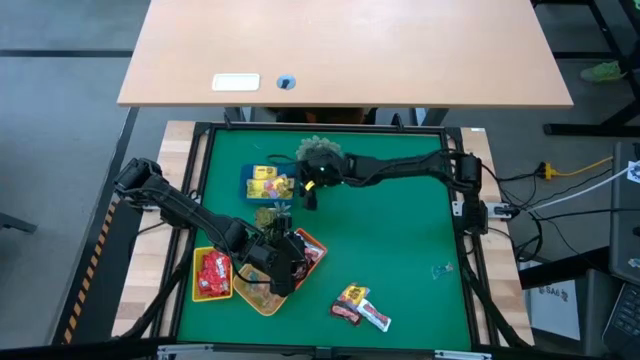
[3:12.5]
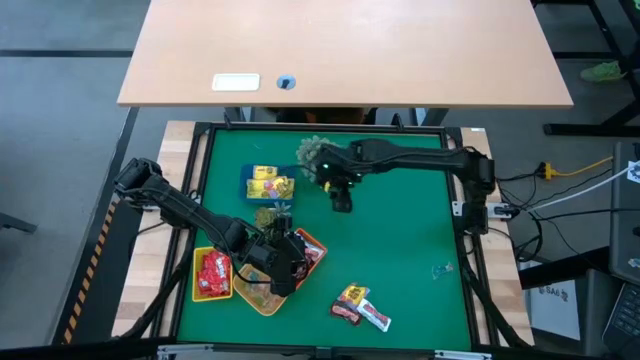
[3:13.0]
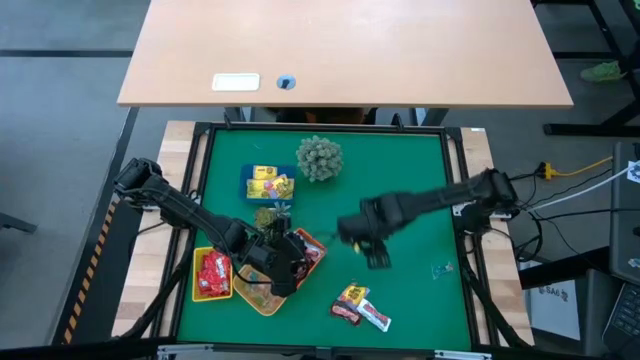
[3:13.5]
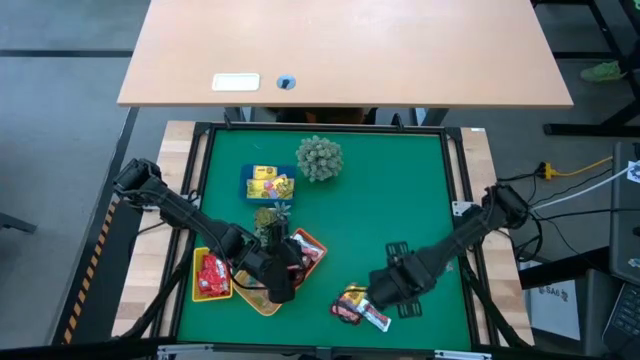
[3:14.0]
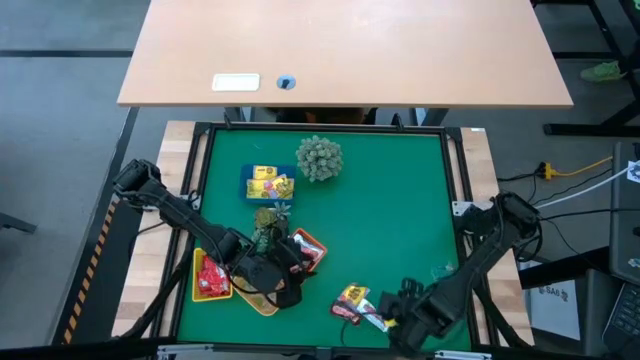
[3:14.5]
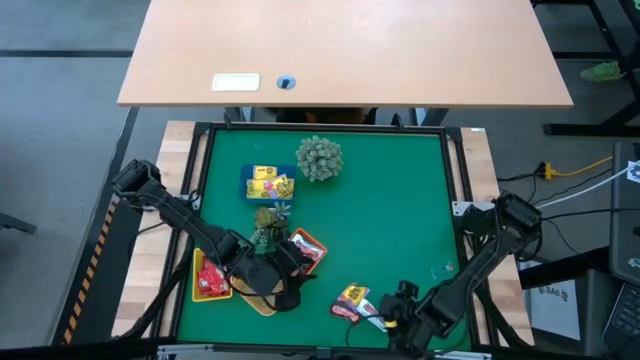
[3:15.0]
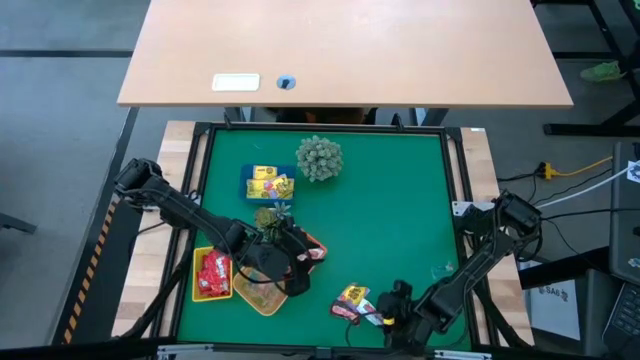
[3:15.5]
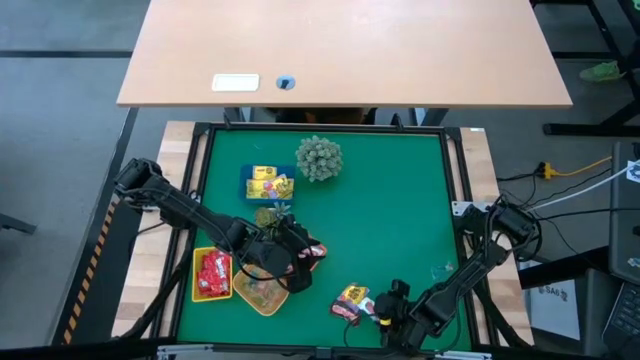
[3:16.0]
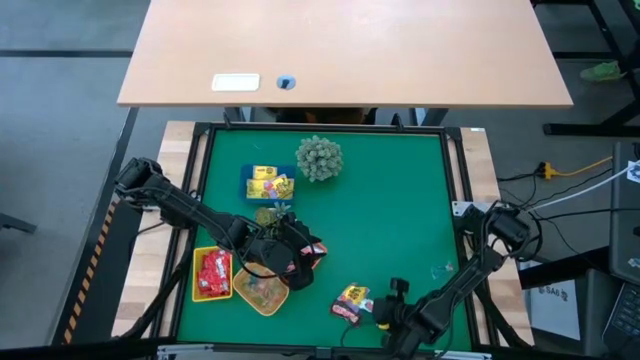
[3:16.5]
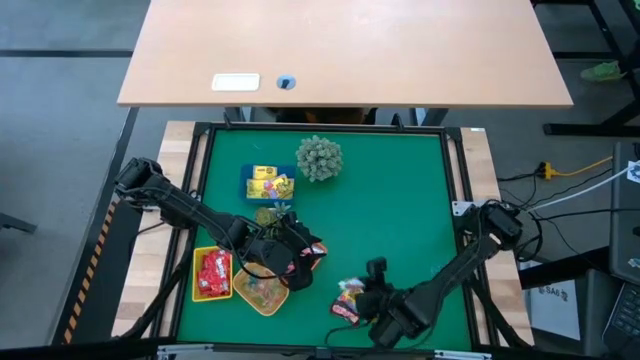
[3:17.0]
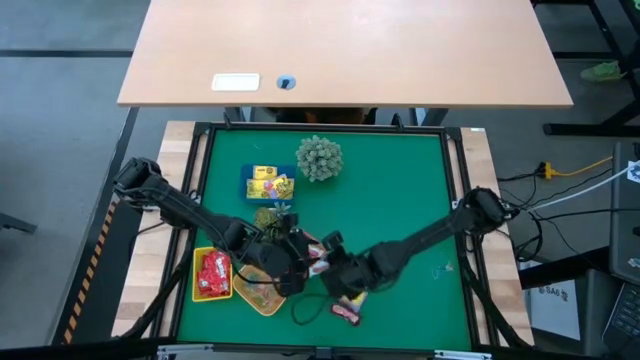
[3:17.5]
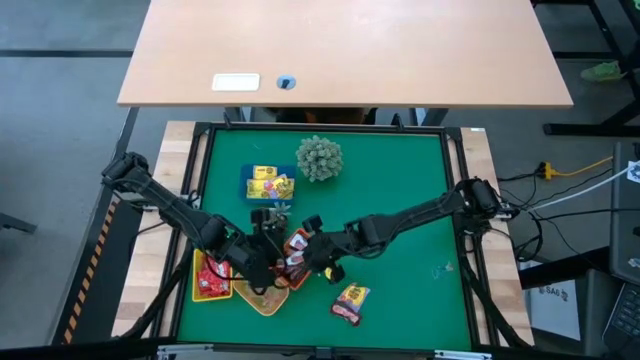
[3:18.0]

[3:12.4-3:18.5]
Task: Sort candy
Put the white chocolate into the orange bin

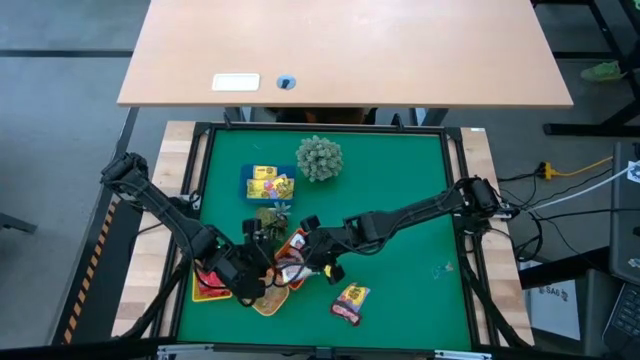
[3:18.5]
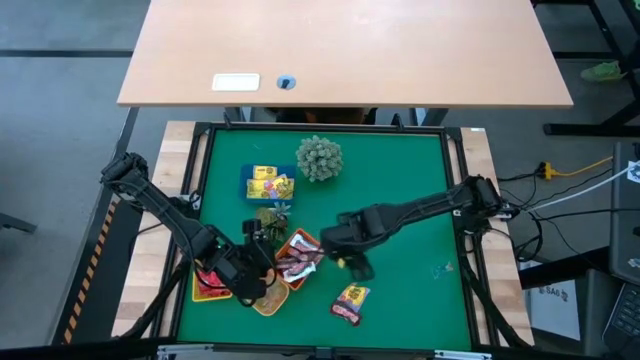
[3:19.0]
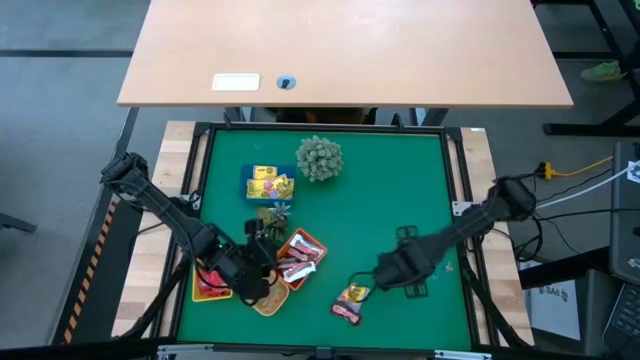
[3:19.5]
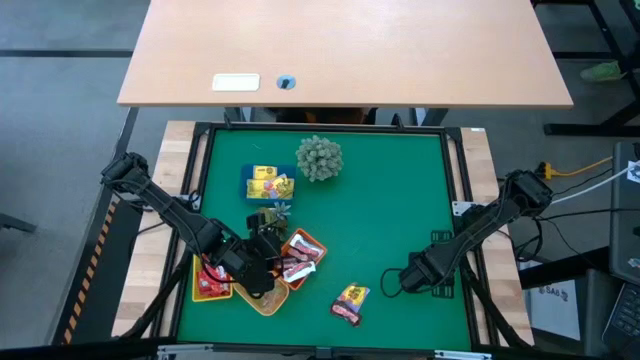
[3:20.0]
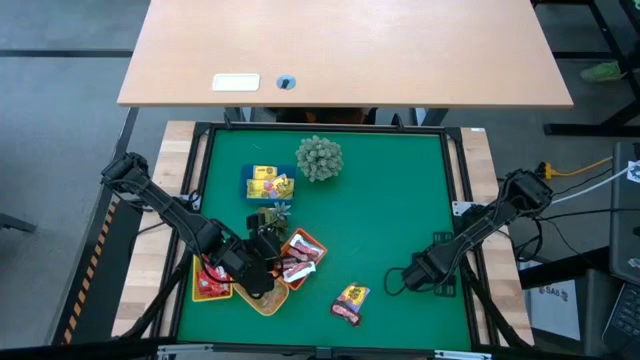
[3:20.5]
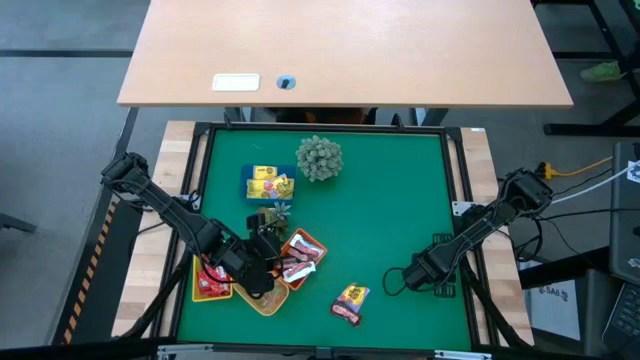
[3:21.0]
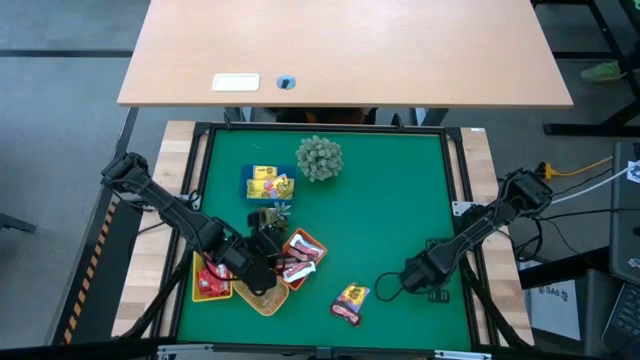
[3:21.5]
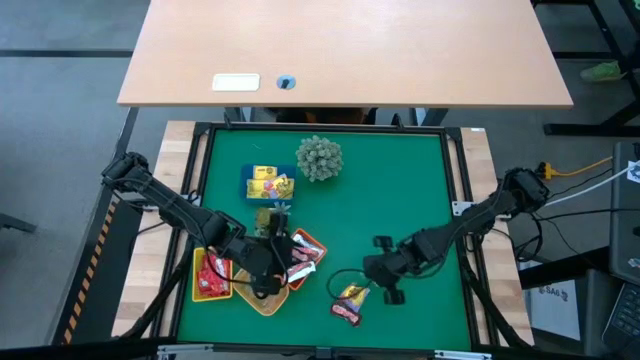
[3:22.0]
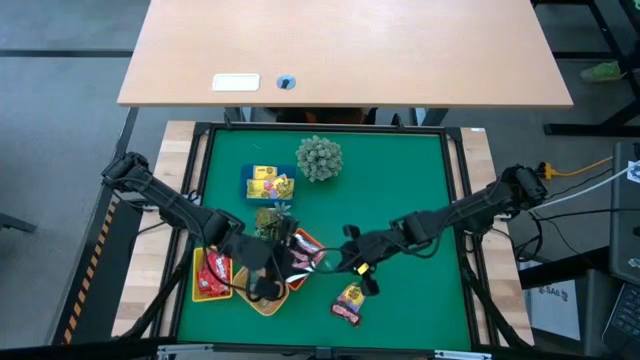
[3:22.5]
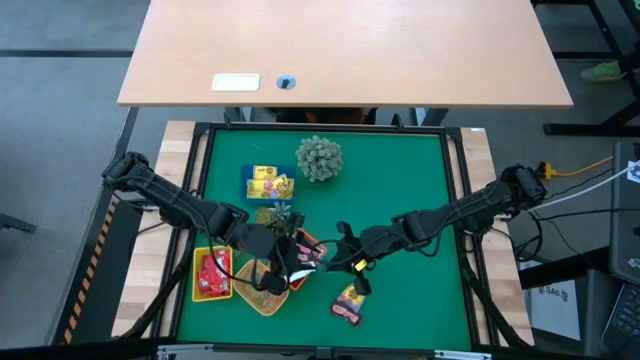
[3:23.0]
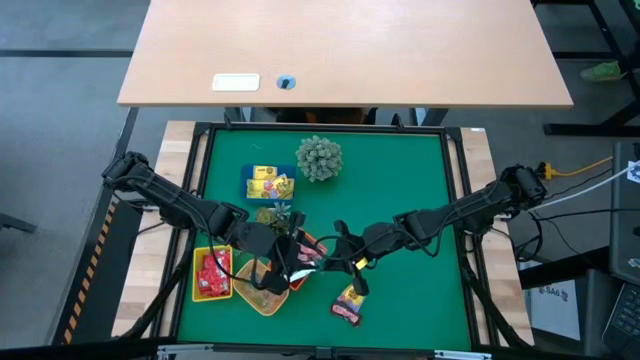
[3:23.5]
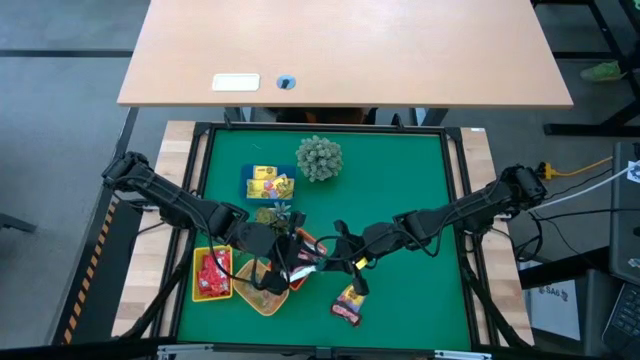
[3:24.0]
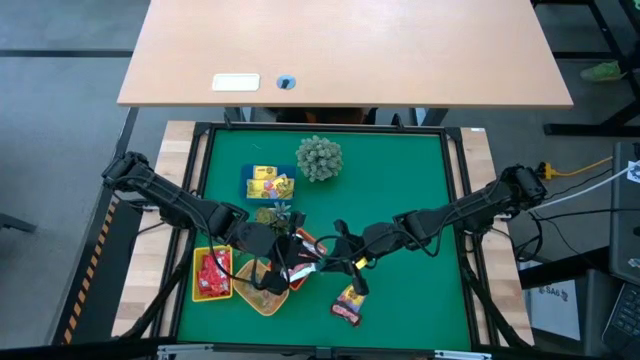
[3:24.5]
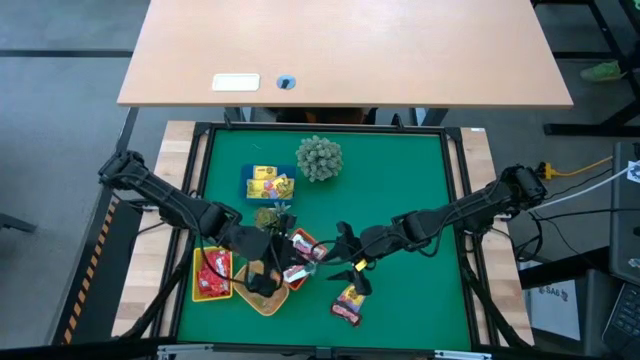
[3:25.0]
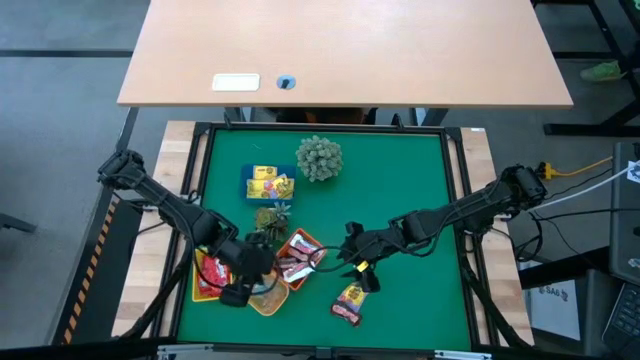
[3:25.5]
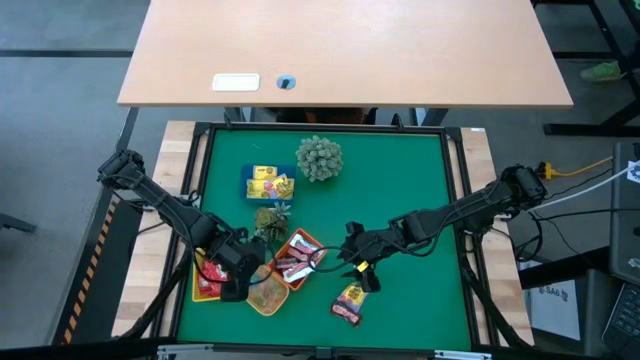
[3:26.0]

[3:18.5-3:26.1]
Put the blue gummy into the light orange bin

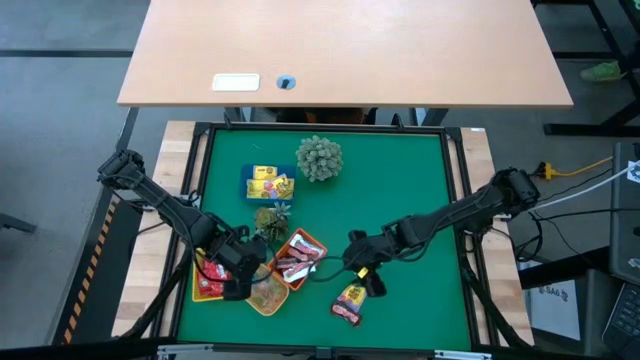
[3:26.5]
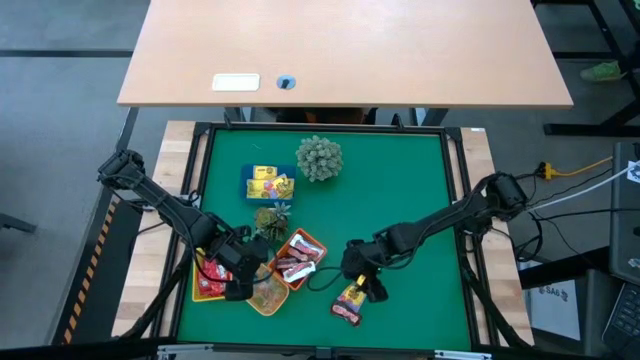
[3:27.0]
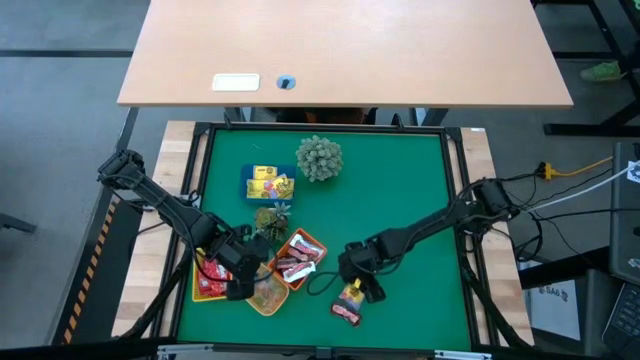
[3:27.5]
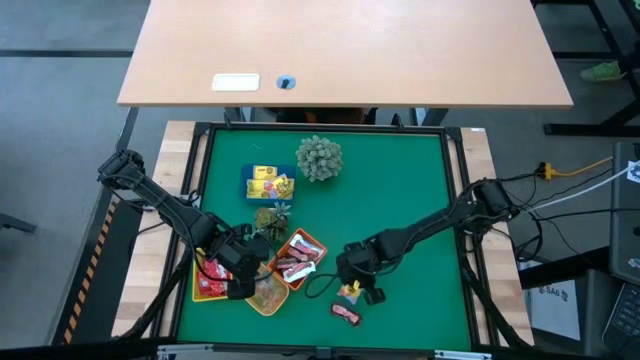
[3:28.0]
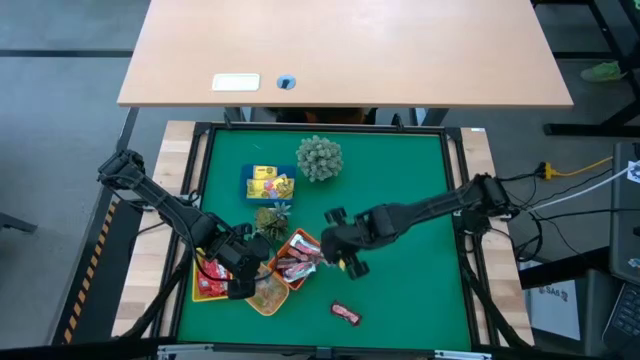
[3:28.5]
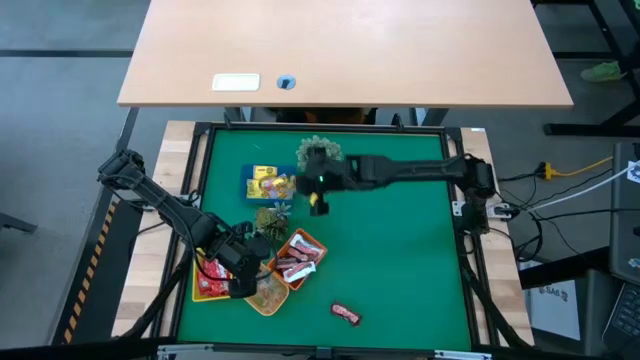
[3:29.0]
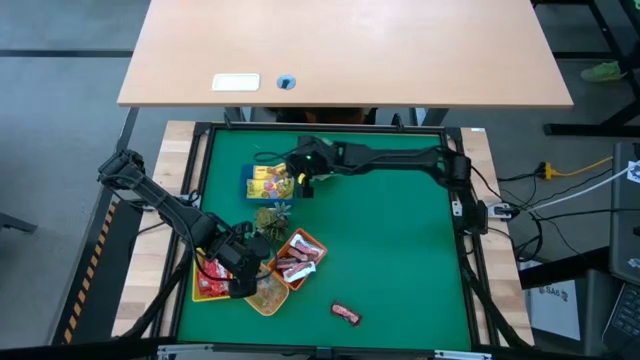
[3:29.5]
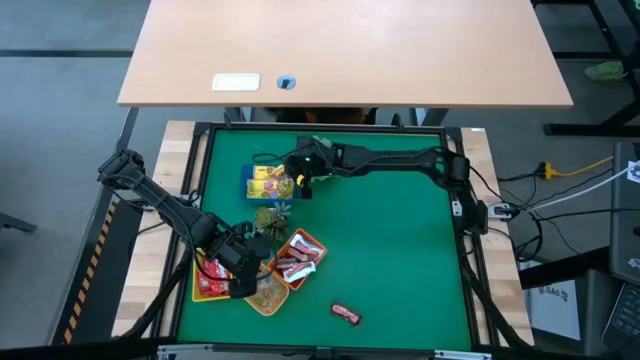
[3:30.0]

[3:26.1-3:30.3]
Put the yellow candy into the blue bin

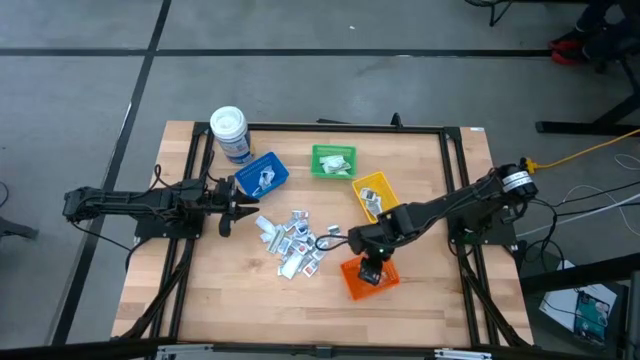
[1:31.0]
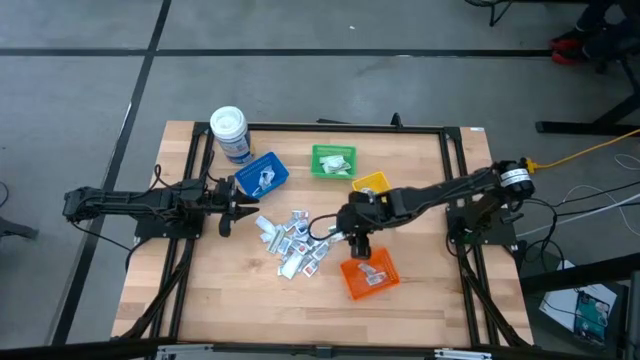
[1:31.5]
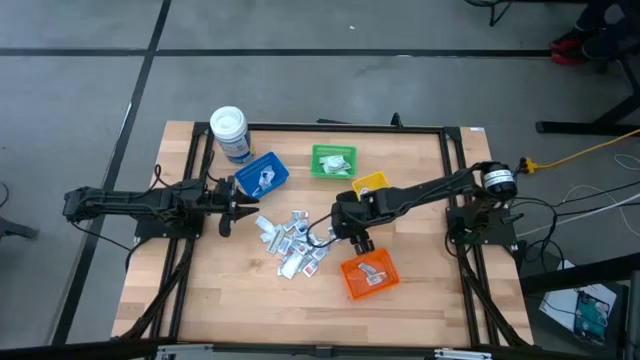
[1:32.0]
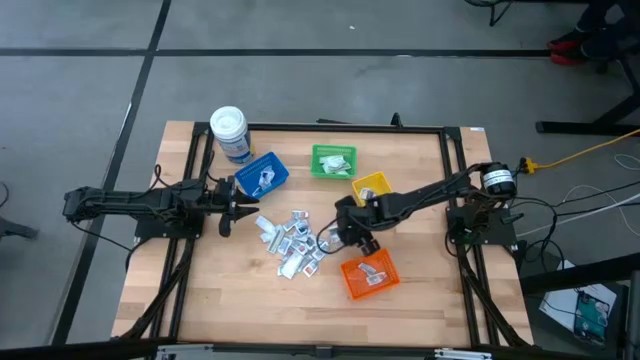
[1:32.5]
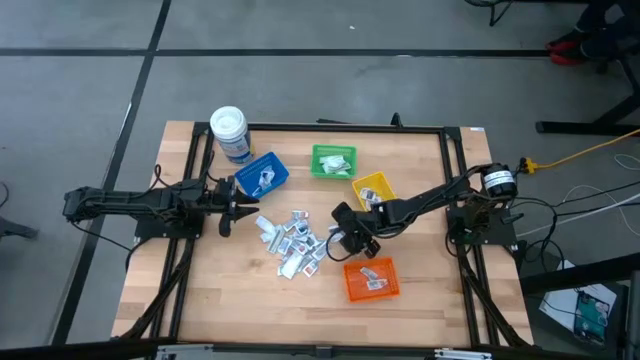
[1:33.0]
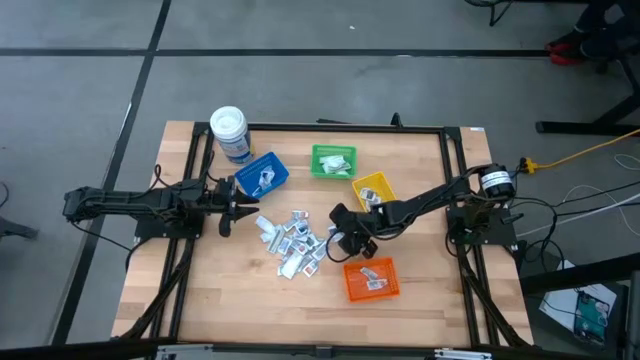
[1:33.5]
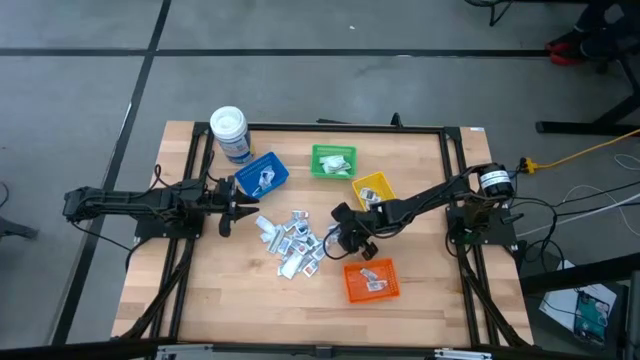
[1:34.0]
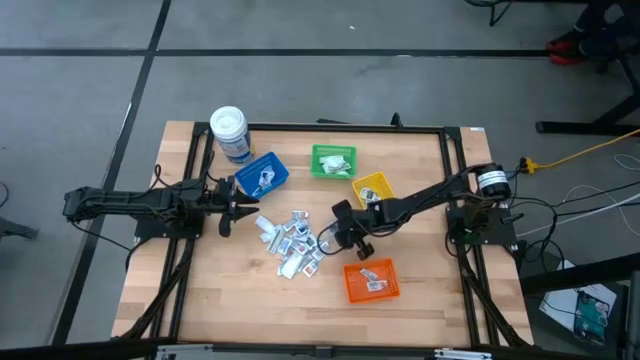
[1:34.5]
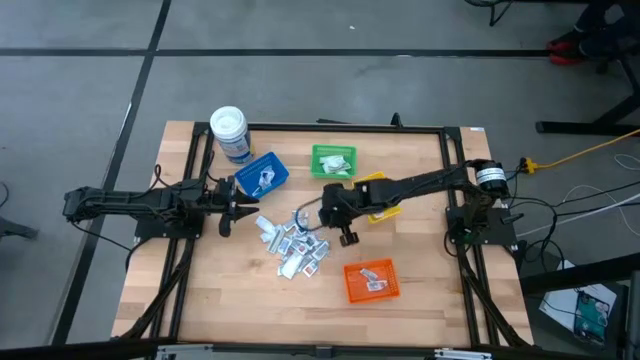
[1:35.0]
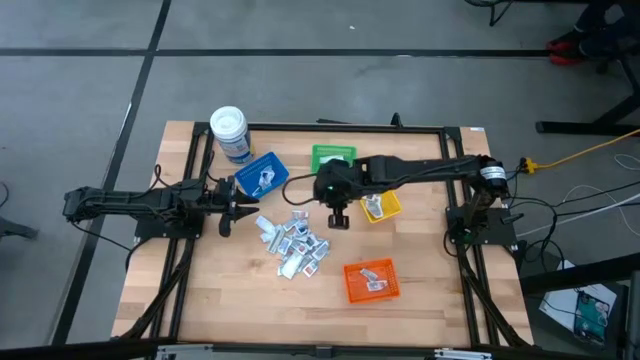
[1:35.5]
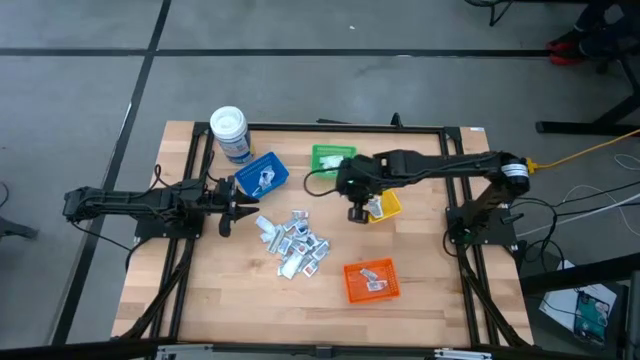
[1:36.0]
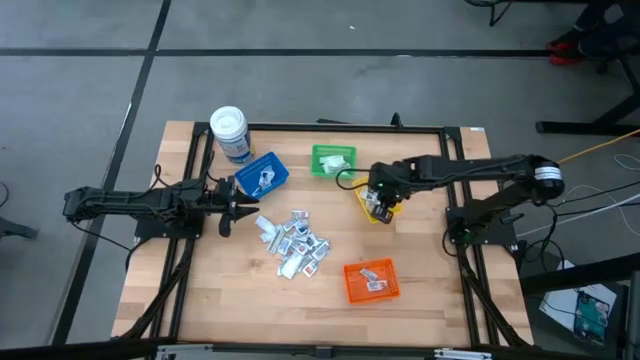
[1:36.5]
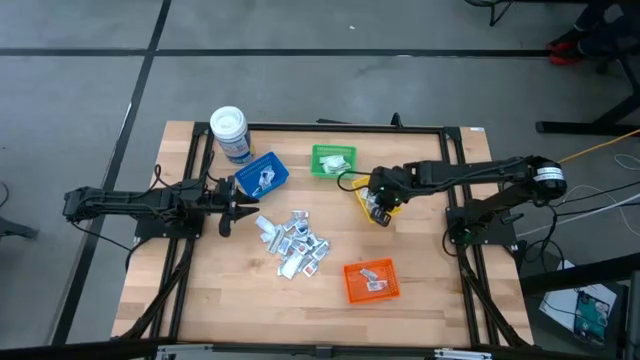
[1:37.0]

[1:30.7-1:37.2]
Task: Pick & Place First Aid Supplies
Put the white towelette pack into the yellow bin
